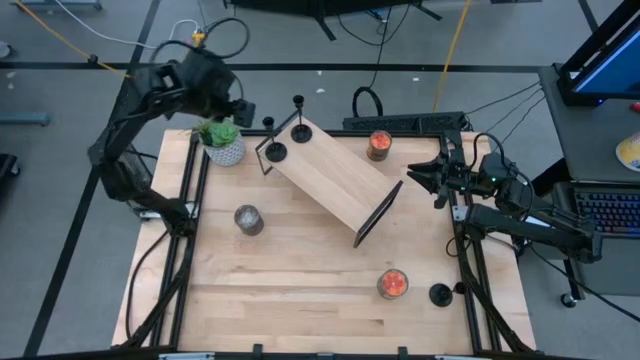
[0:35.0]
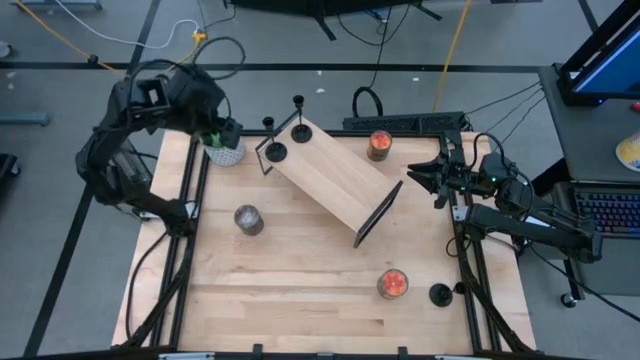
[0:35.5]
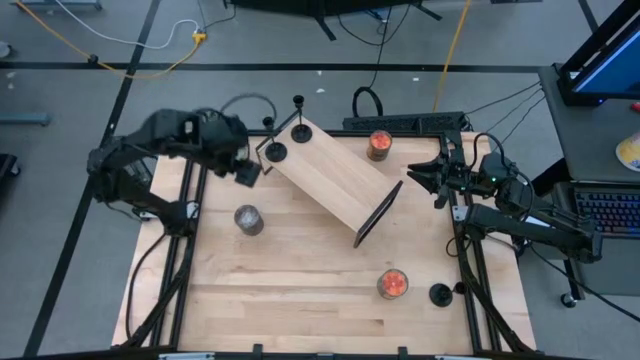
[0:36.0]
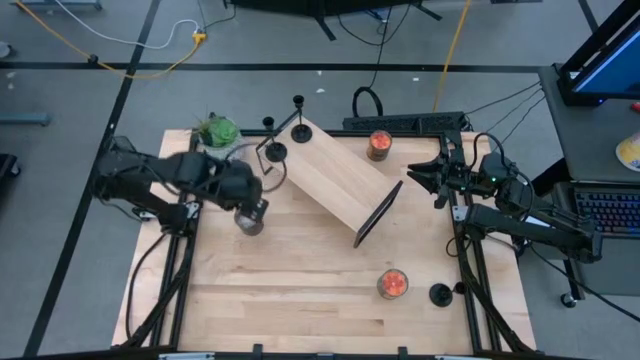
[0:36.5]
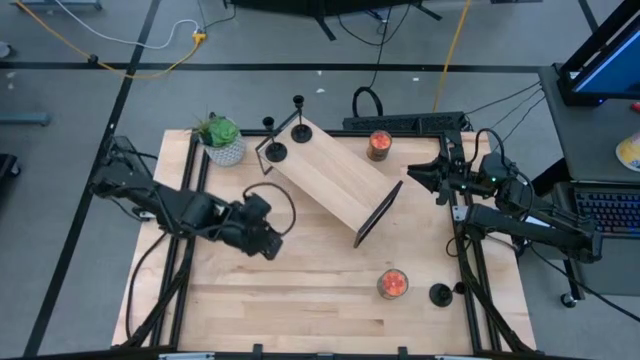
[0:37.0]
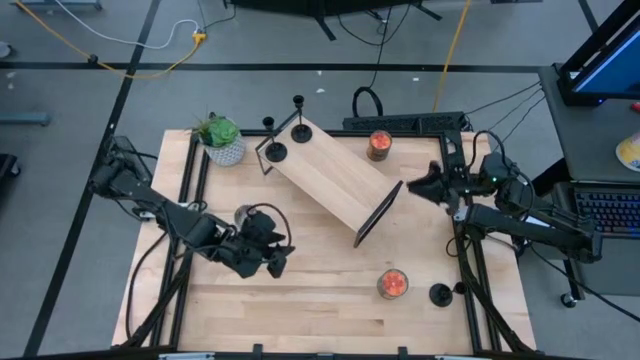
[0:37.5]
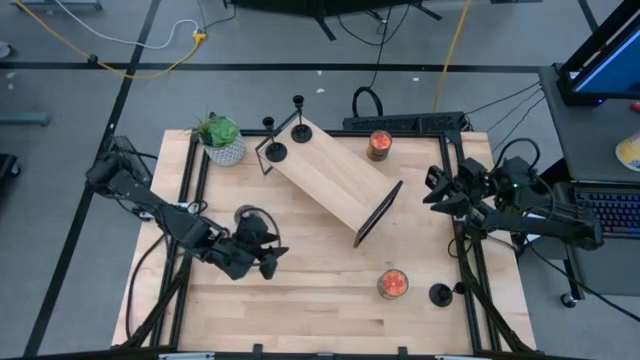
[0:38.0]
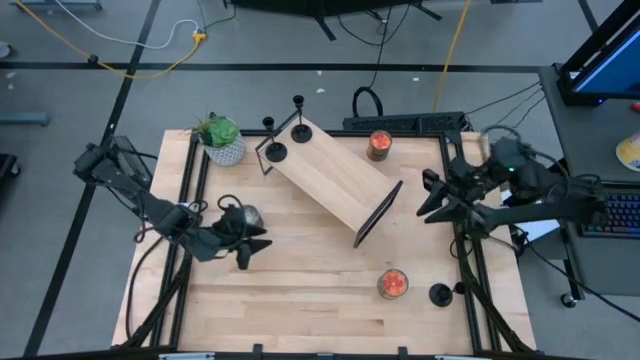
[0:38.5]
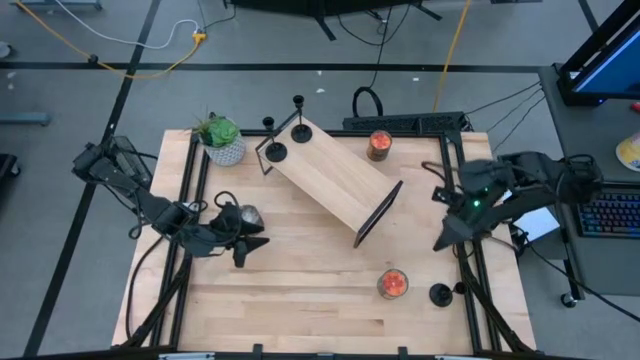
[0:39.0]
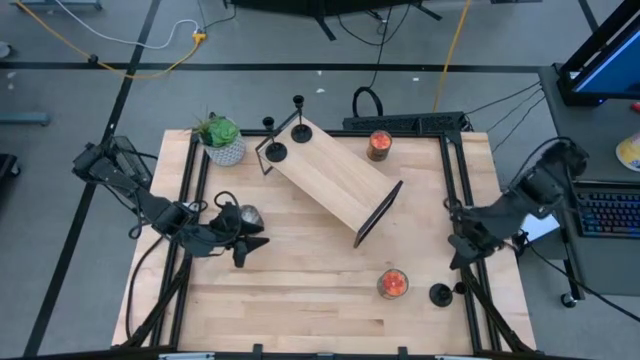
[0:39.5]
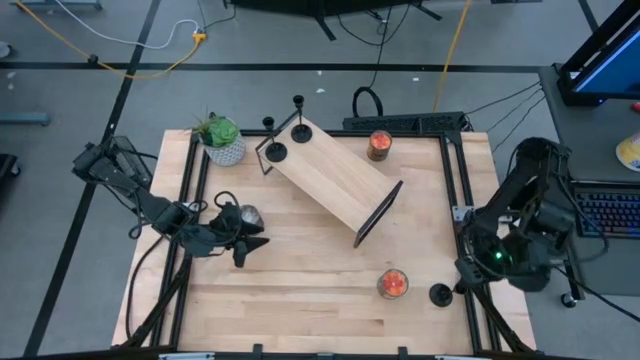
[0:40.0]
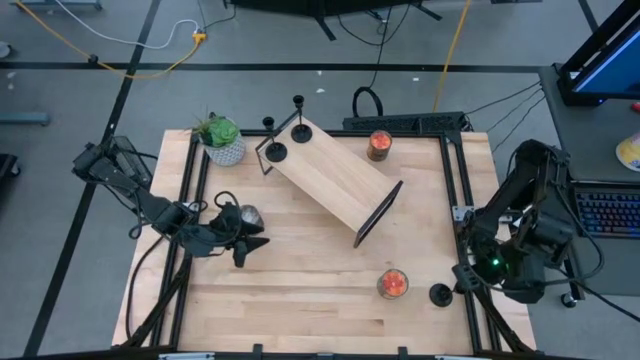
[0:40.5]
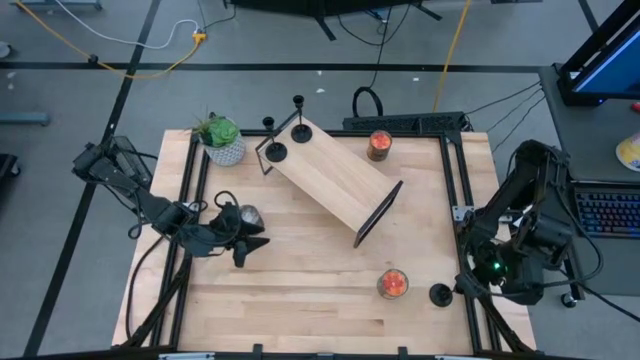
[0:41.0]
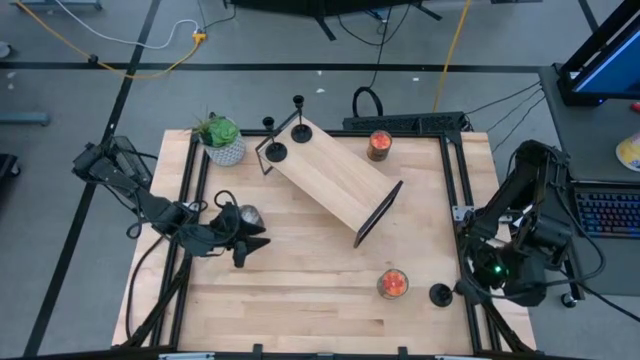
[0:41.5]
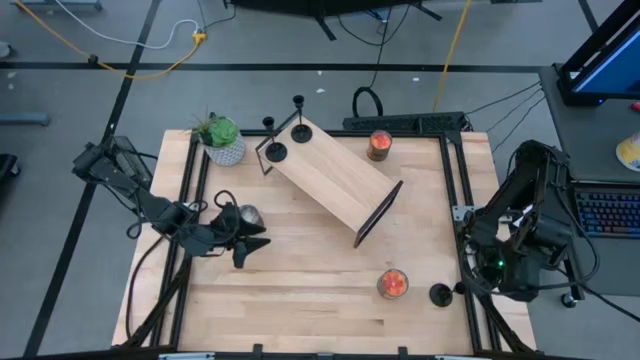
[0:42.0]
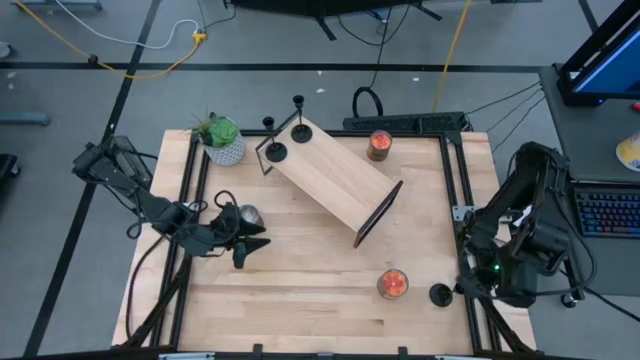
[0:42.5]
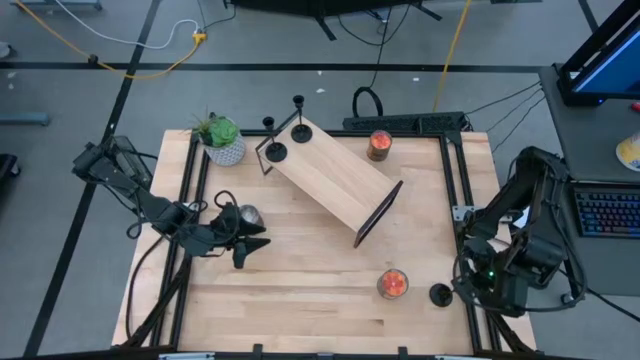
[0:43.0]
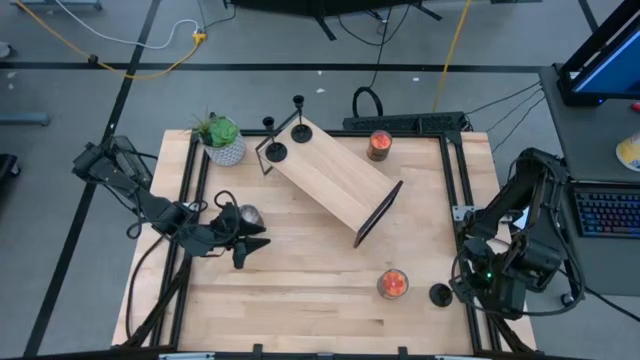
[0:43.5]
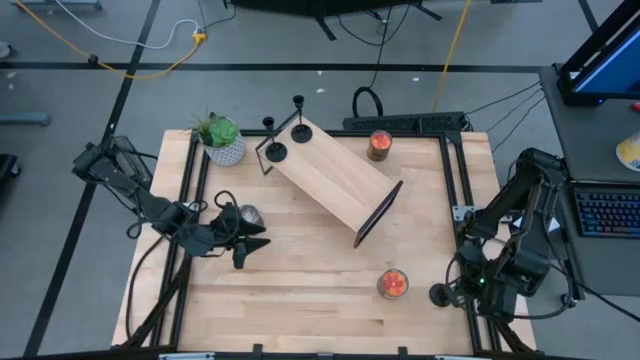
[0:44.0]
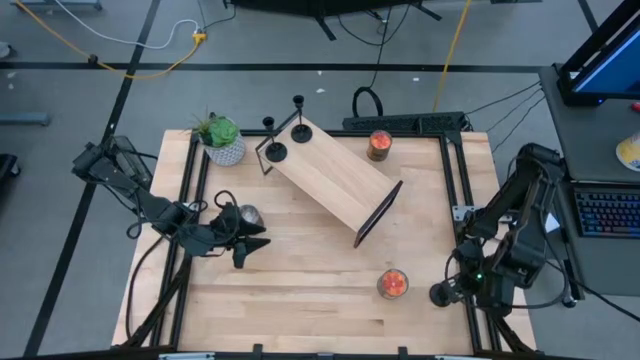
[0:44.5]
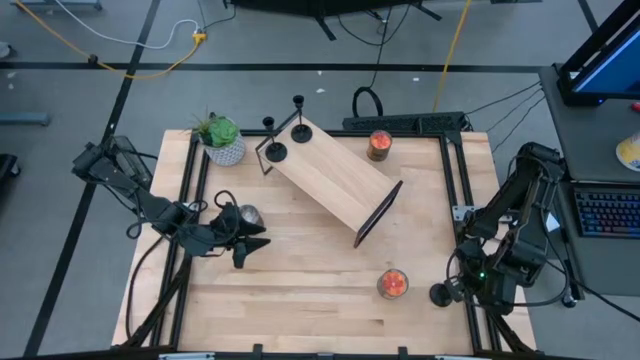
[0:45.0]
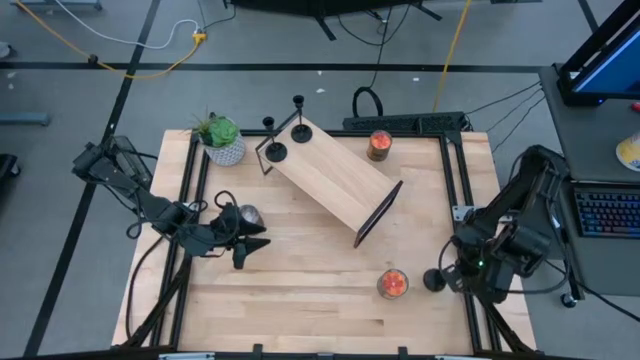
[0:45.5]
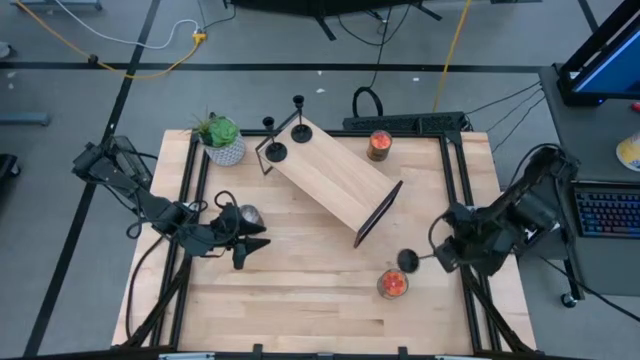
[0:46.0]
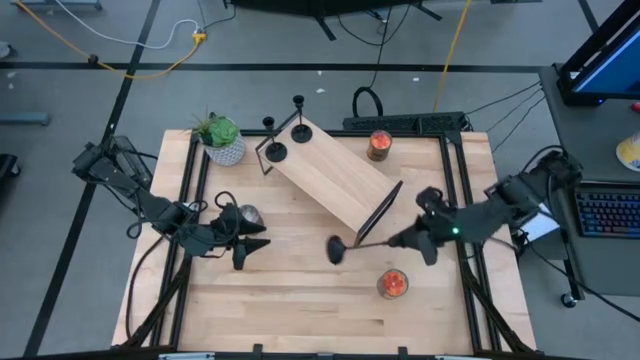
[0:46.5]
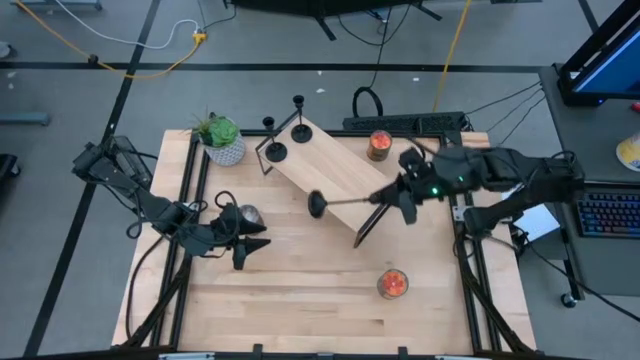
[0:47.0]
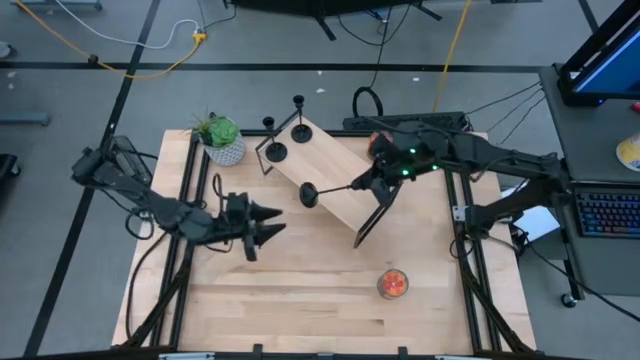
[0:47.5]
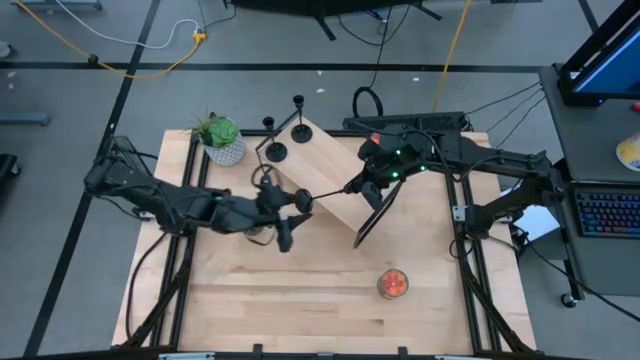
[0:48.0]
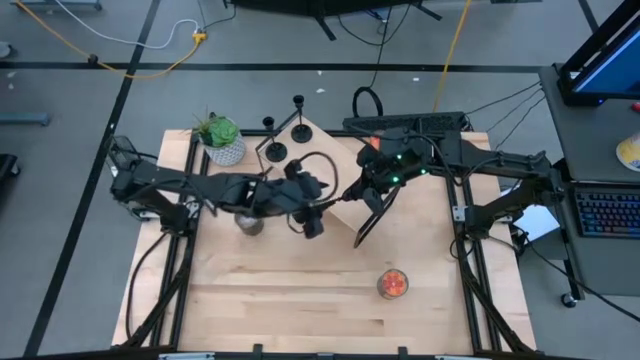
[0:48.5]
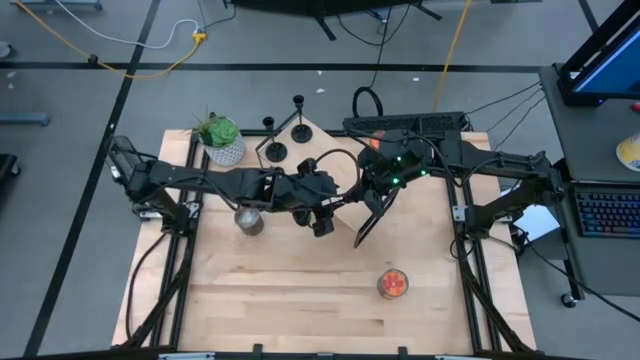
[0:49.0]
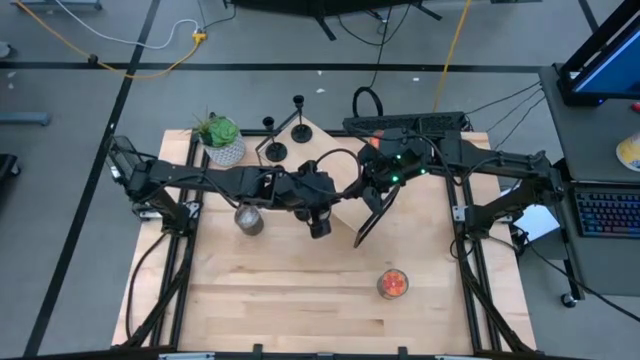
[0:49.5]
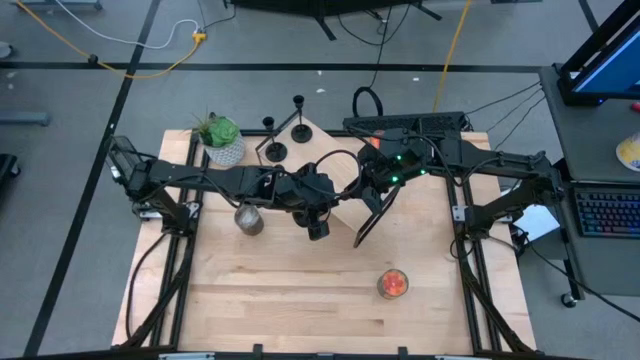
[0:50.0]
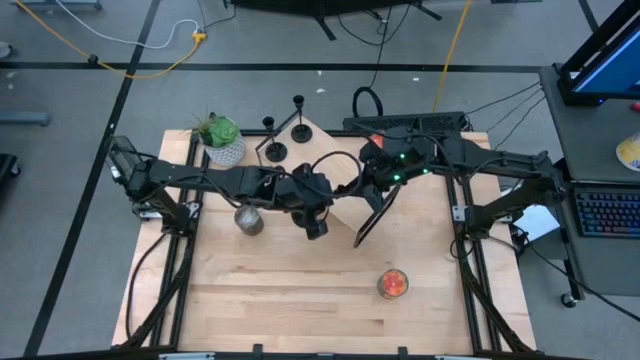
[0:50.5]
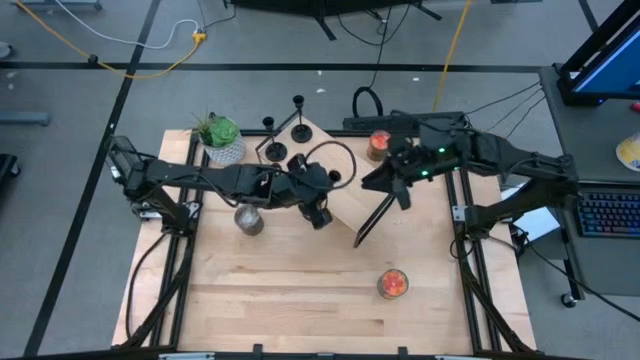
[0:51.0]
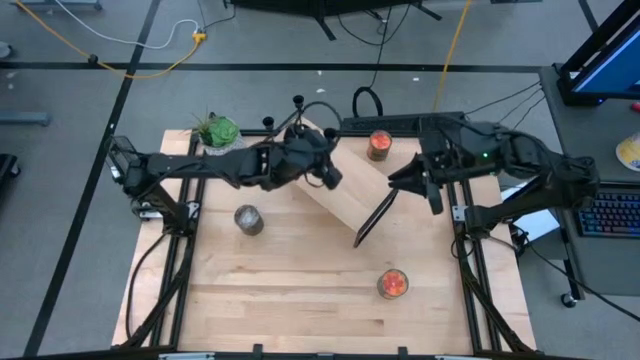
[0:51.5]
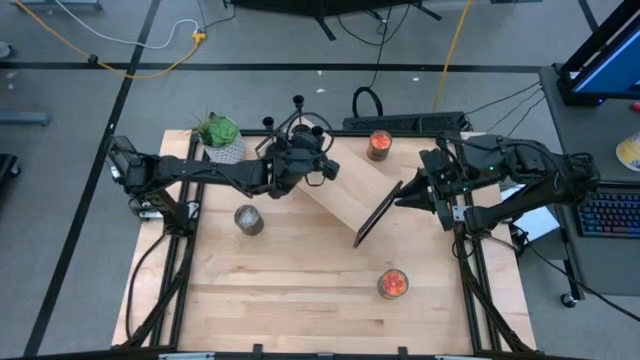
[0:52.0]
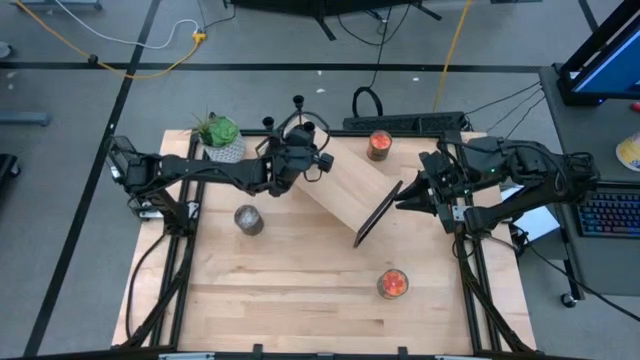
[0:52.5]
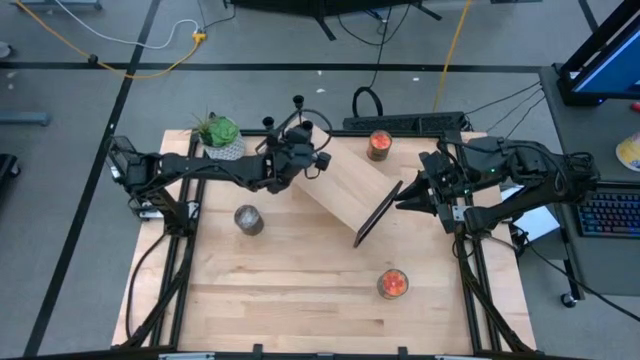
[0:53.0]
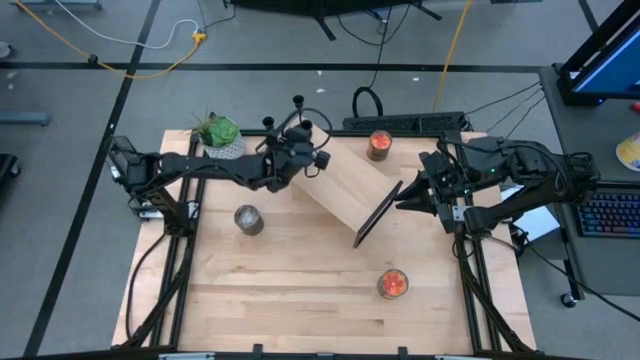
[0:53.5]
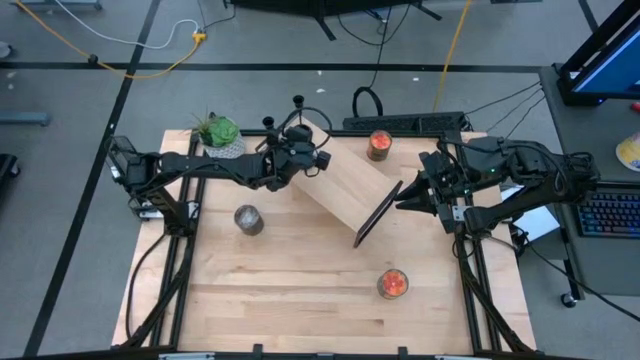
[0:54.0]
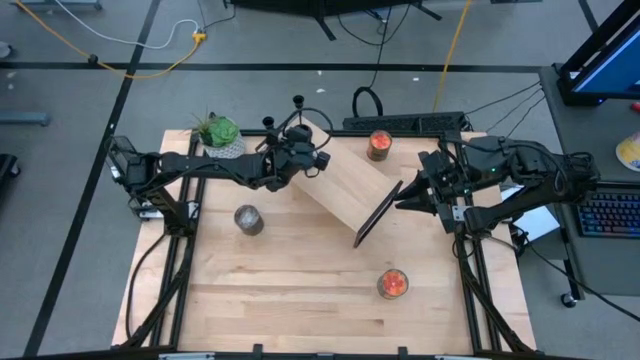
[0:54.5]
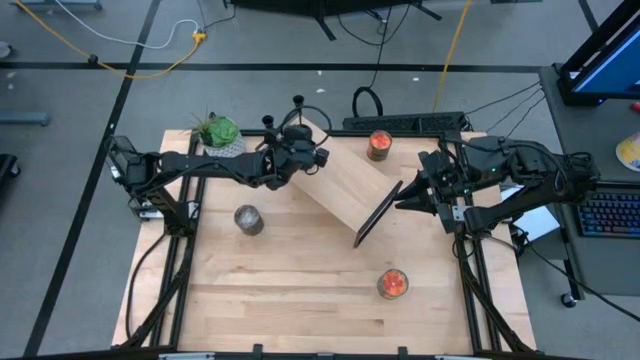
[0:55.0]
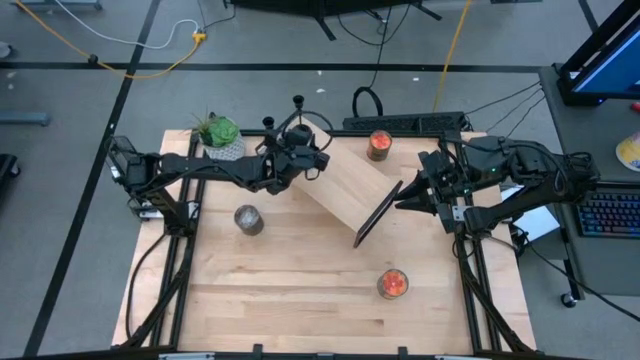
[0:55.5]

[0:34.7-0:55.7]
Task: Pick & Place candle stick holders
Put the candle holder on the shelf
